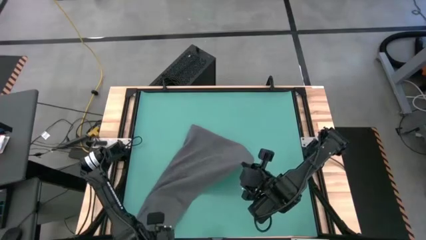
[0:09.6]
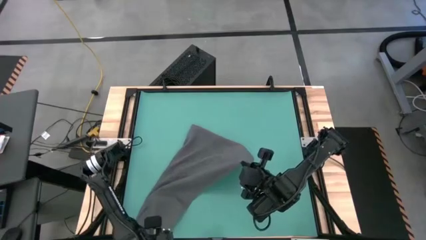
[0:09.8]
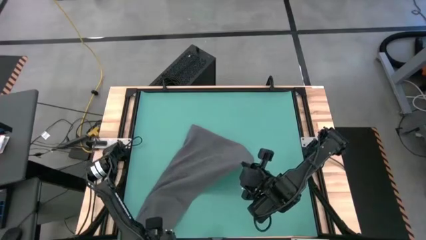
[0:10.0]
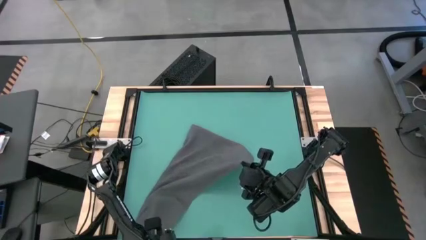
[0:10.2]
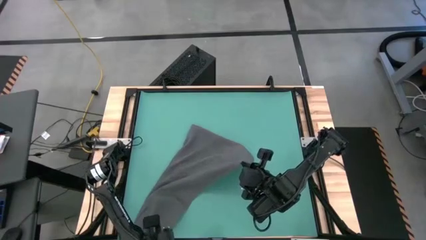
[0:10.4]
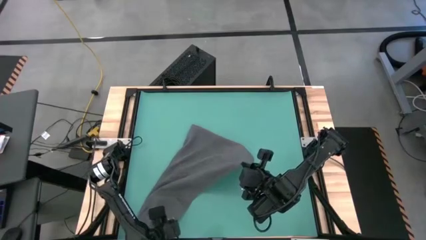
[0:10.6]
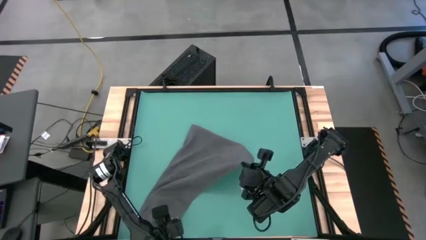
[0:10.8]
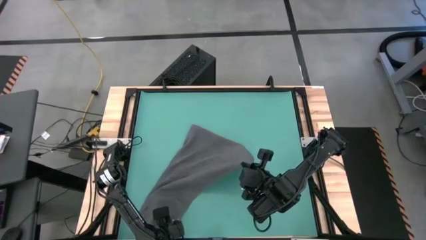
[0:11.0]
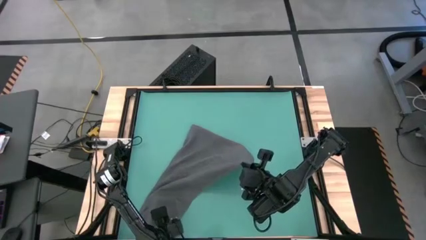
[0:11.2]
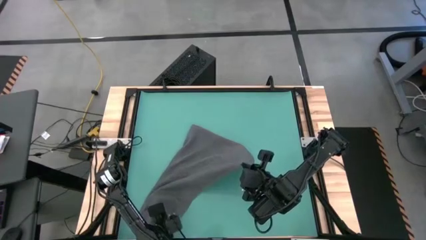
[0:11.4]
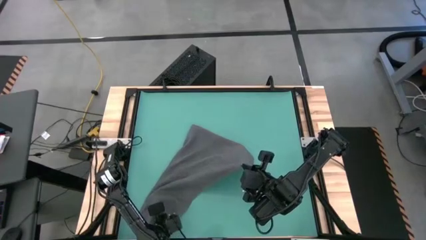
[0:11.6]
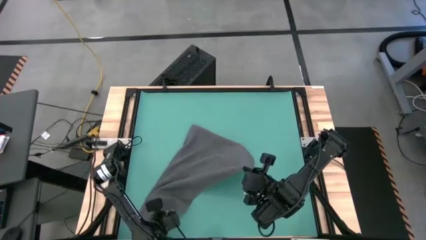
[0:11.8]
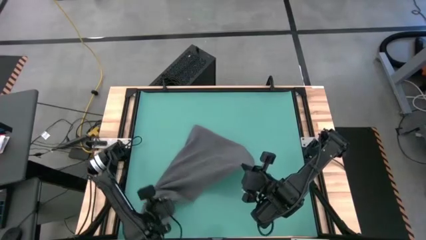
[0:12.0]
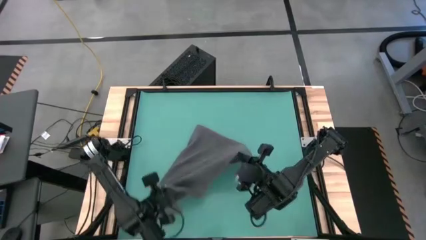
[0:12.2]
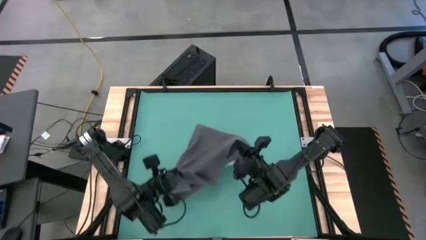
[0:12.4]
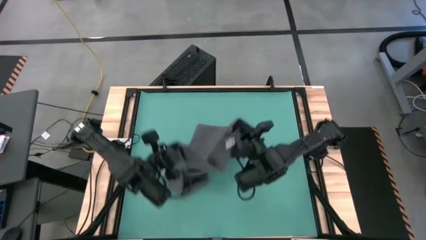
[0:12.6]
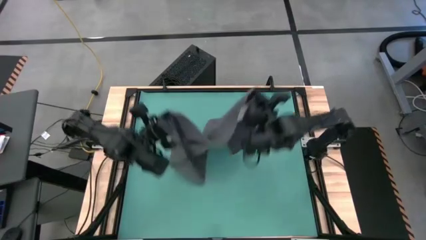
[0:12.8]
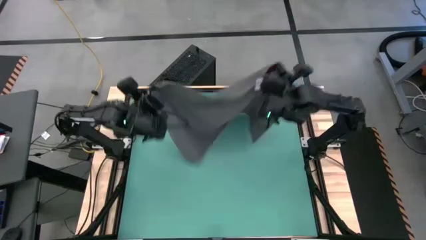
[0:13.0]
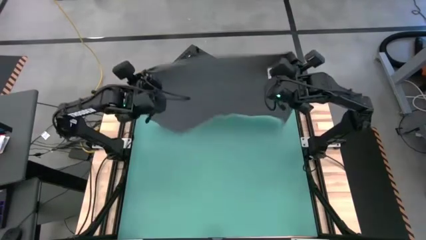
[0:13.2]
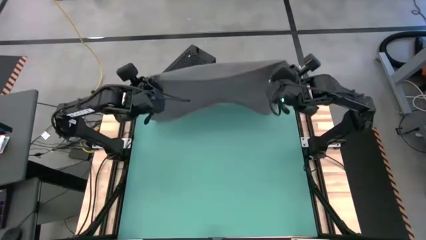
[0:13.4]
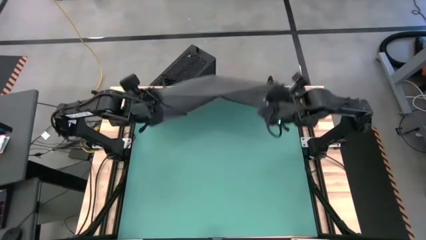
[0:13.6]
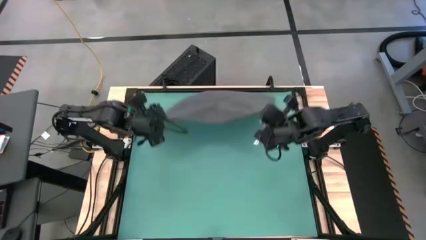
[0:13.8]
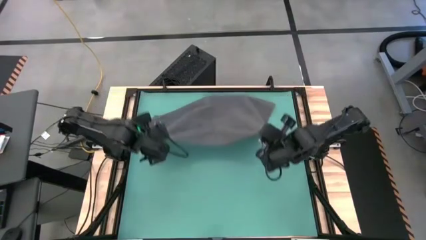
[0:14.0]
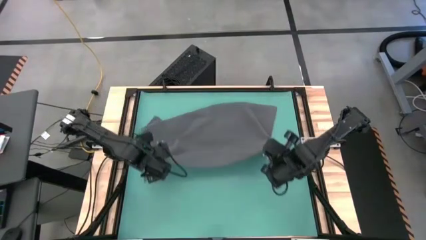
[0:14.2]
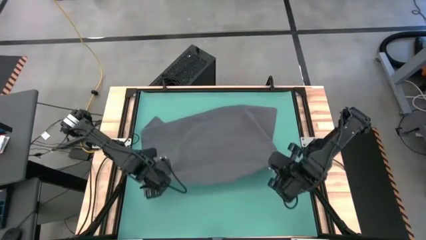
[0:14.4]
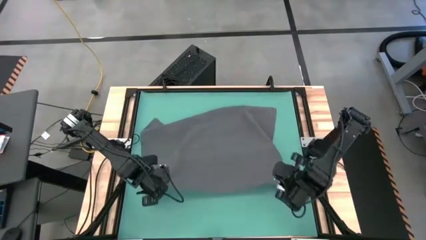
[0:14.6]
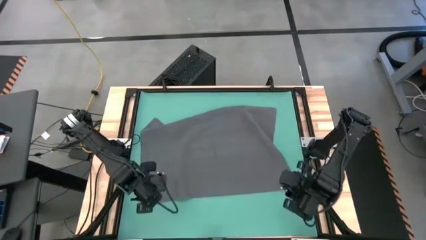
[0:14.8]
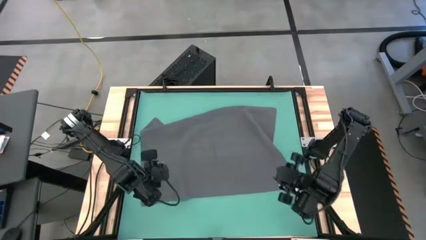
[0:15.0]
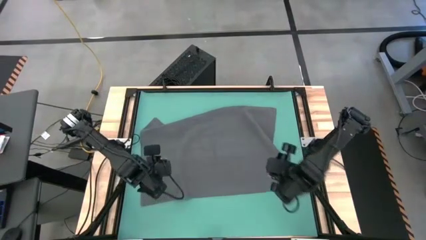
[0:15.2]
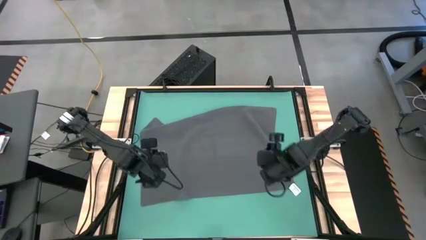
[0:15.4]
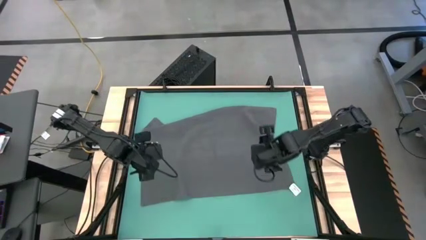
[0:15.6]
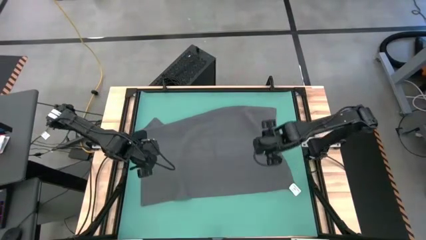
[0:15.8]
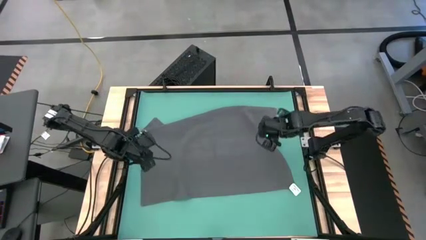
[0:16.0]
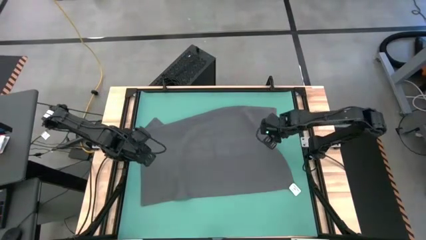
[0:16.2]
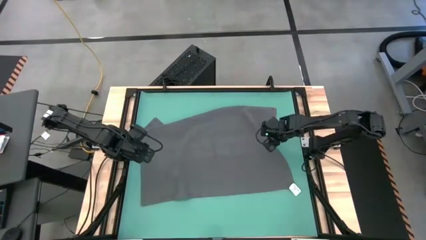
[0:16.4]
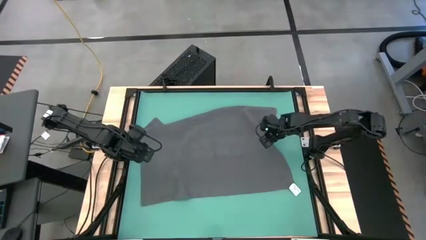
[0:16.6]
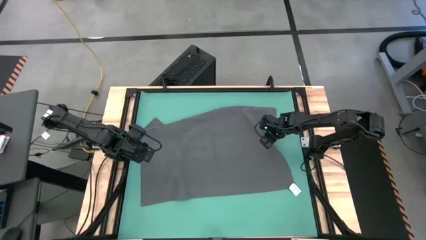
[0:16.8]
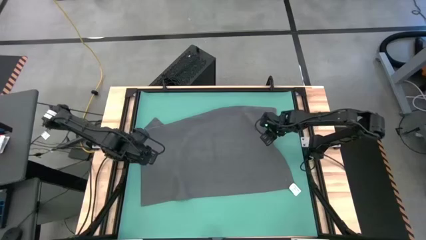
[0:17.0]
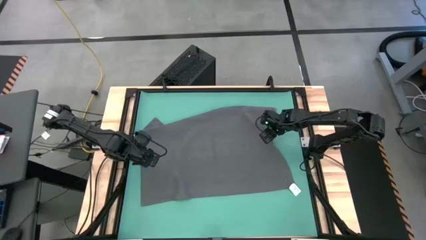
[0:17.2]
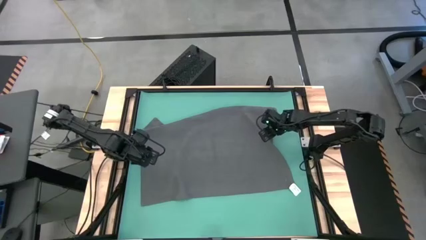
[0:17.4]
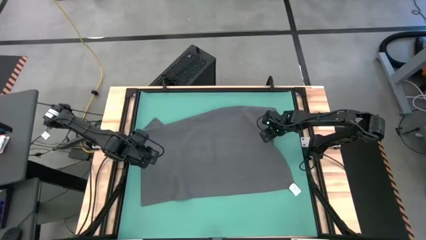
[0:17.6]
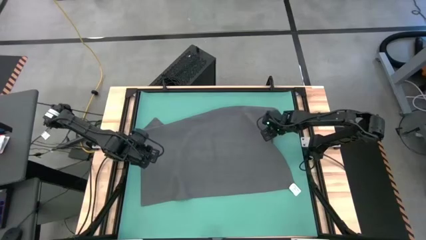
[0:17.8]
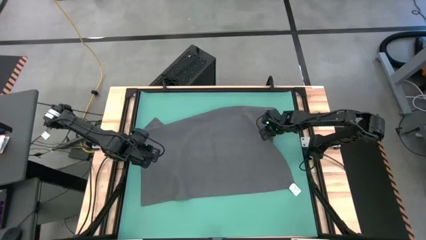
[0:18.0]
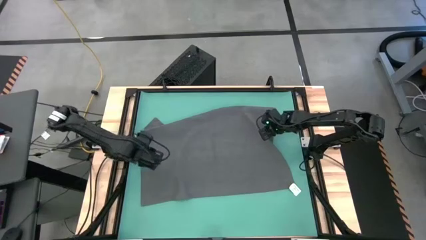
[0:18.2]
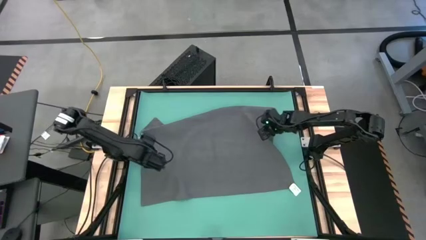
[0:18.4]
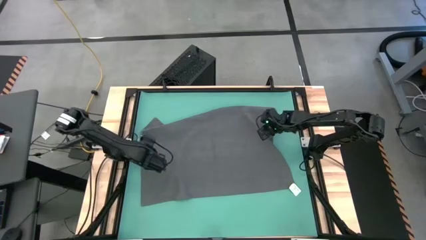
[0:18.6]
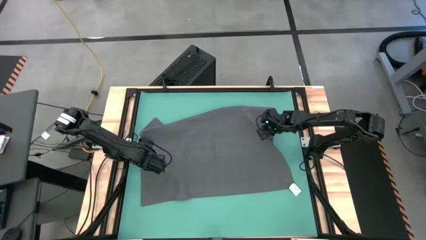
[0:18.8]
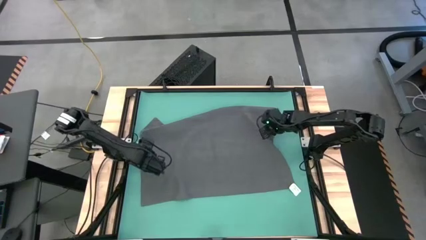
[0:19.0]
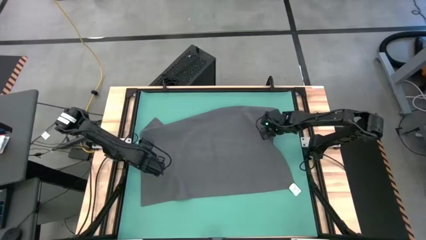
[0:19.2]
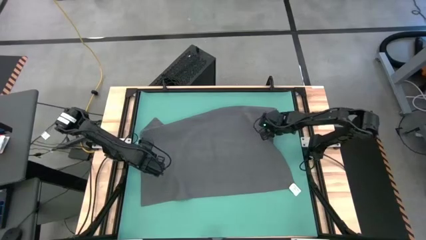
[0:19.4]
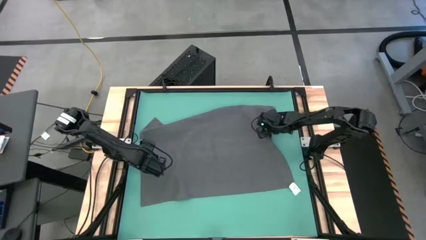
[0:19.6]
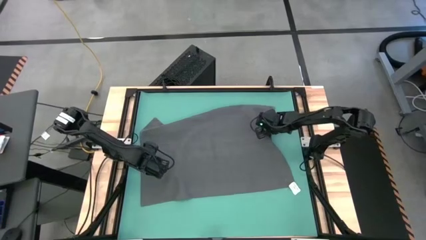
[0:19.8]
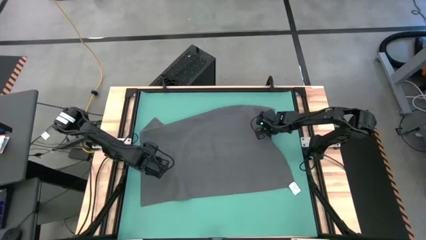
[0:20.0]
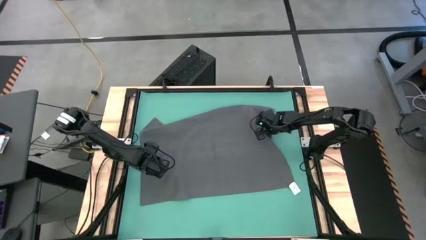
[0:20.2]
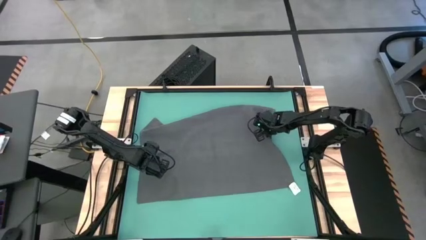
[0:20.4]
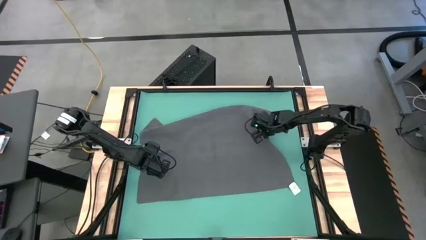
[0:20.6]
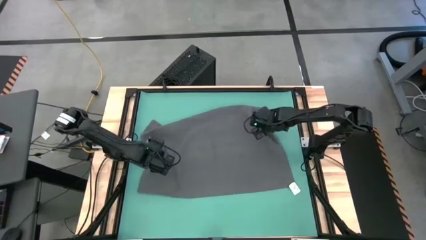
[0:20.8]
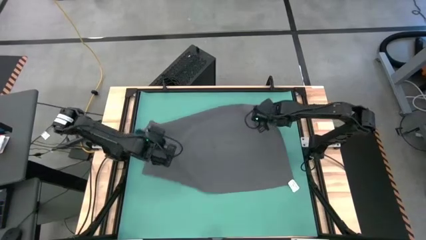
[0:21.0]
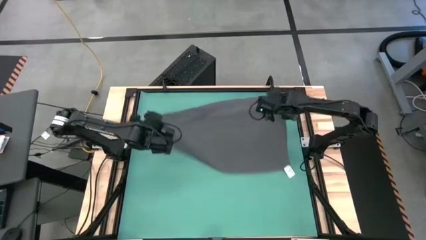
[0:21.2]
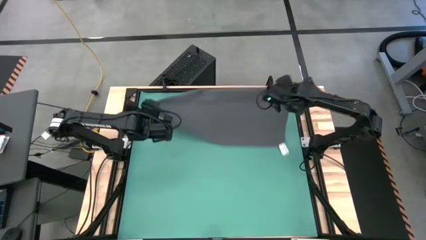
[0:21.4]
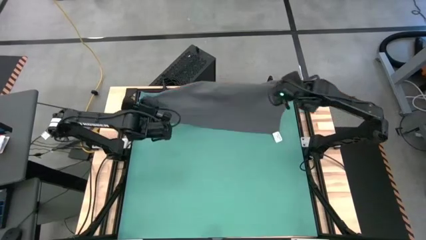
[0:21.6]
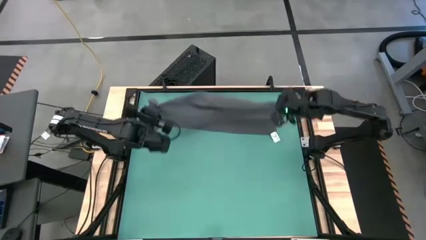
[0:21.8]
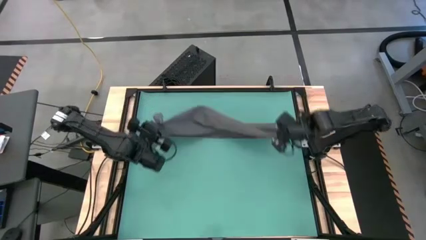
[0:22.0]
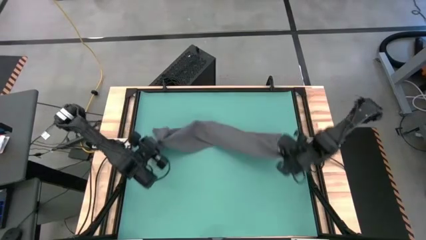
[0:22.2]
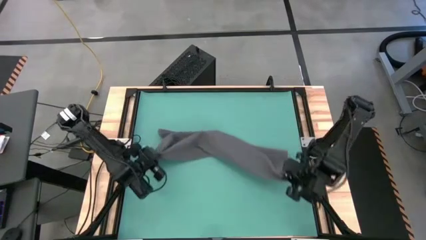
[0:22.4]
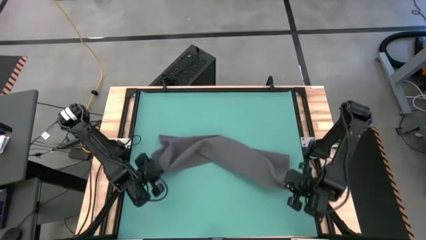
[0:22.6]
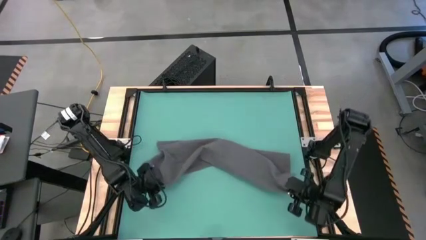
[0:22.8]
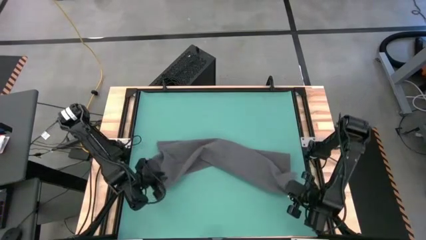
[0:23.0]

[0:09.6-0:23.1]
Task: Roll towel
Roll the gray towel

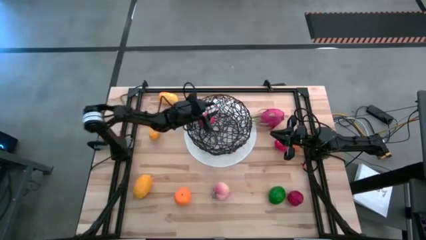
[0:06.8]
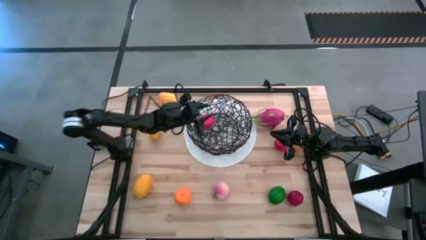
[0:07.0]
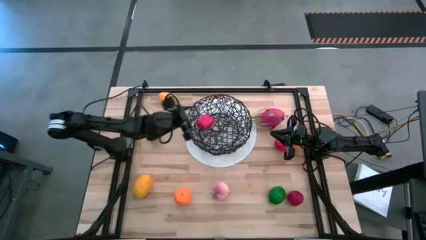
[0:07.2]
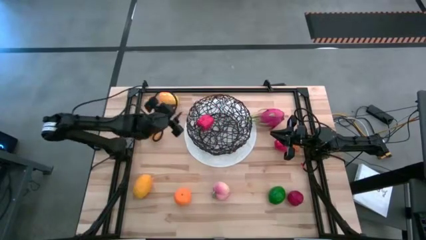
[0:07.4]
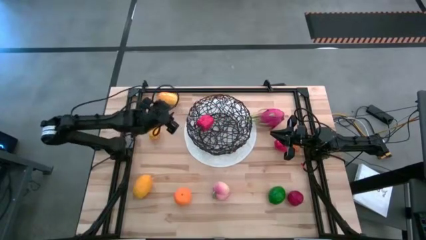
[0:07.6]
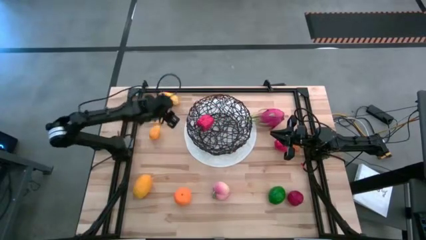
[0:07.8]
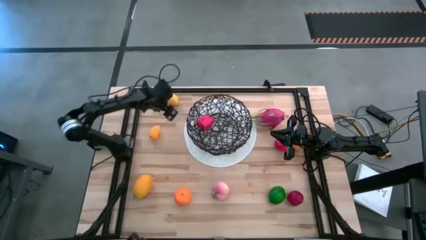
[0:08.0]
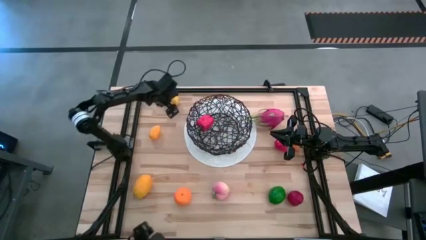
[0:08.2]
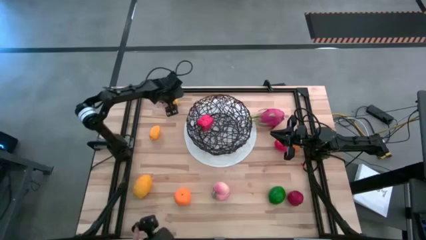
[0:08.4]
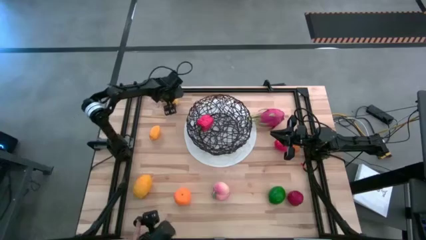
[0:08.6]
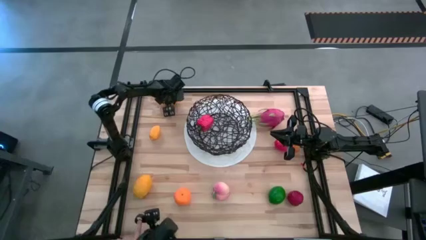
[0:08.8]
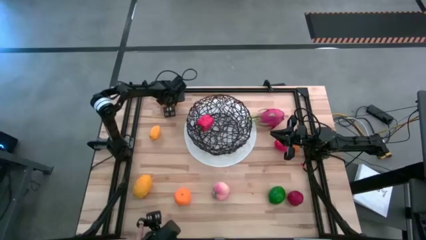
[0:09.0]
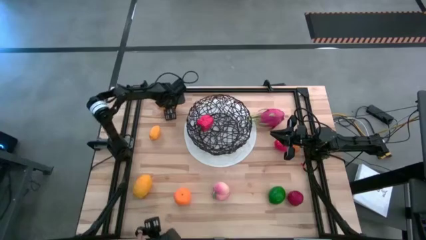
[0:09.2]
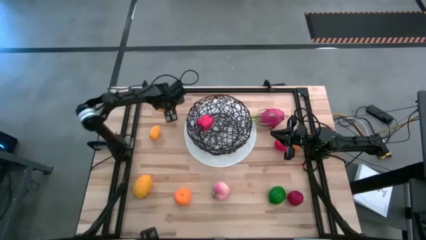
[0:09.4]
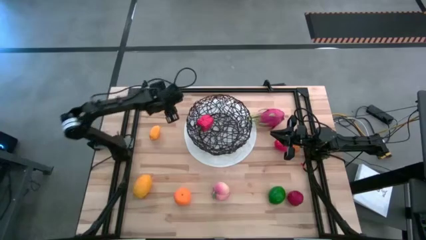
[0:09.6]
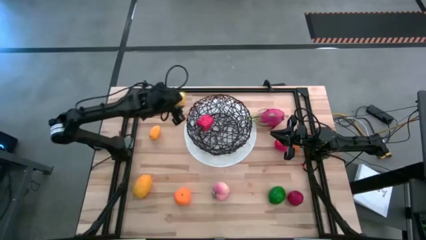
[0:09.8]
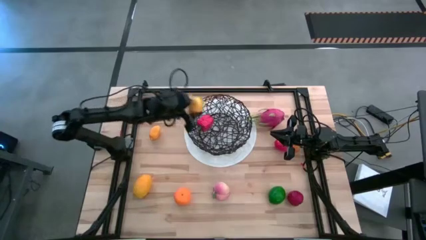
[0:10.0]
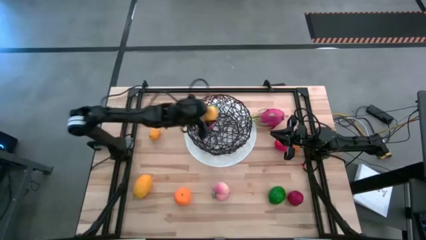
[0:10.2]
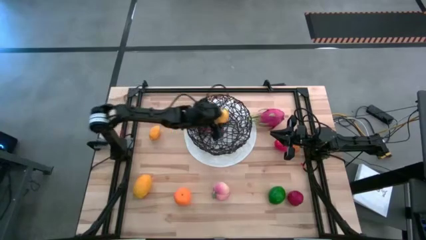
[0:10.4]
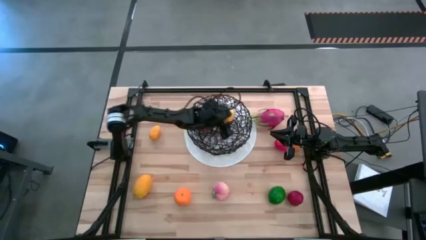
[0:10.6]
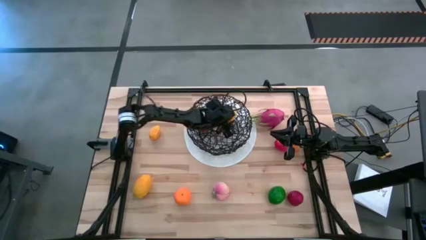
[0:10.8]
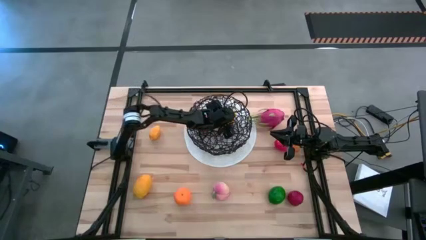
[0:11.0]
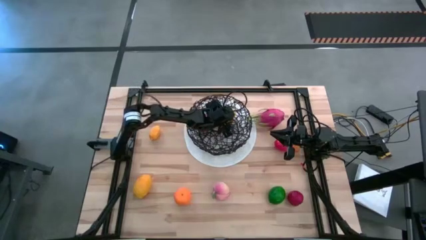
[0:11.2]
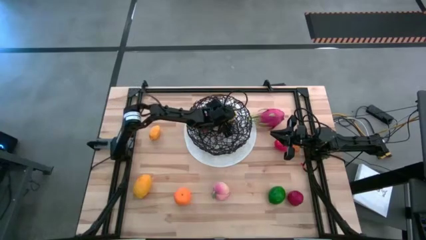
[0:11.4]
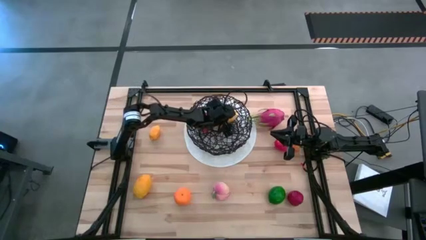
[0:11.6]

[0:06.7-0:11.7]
Task: Build produce basket
Put the yellow mango into the wire basket
